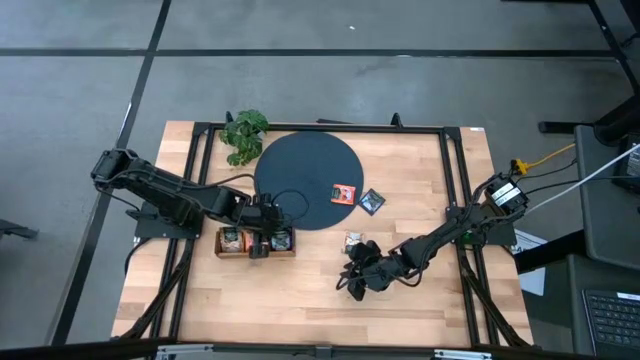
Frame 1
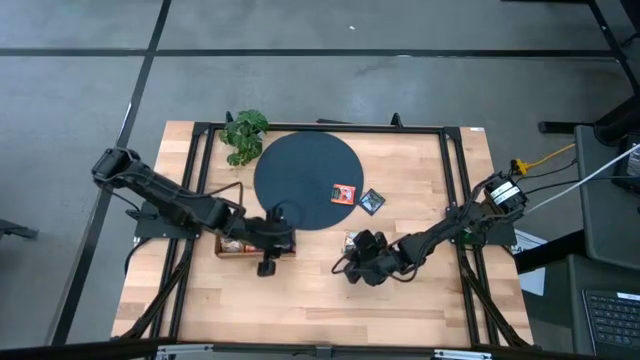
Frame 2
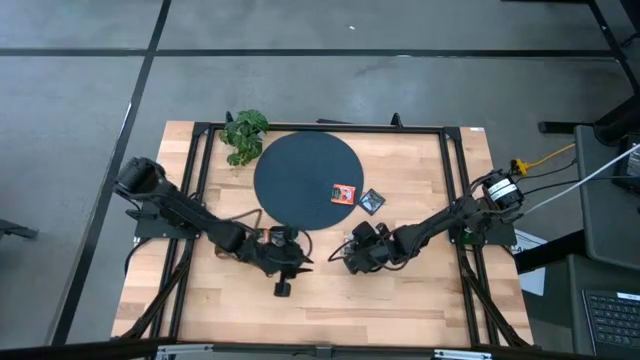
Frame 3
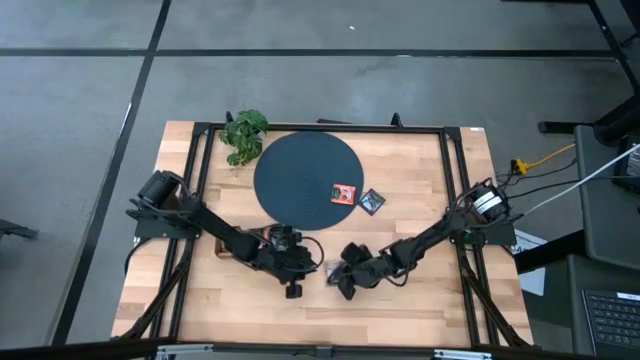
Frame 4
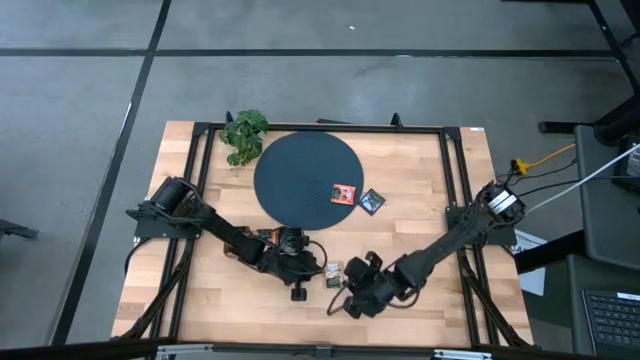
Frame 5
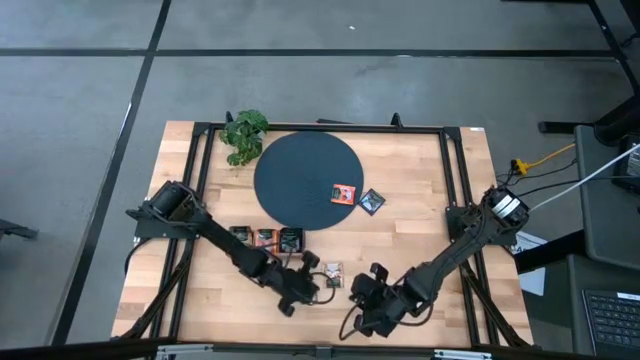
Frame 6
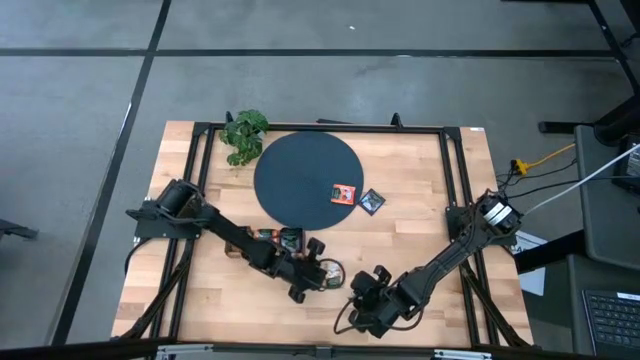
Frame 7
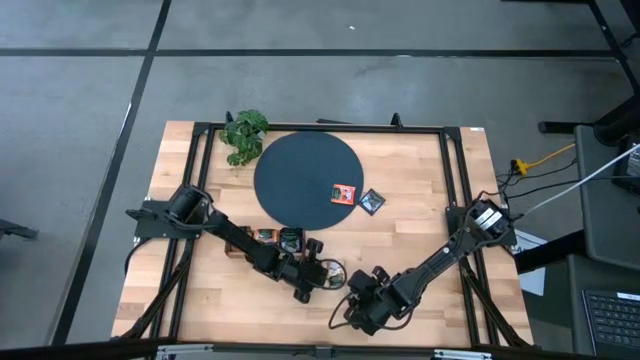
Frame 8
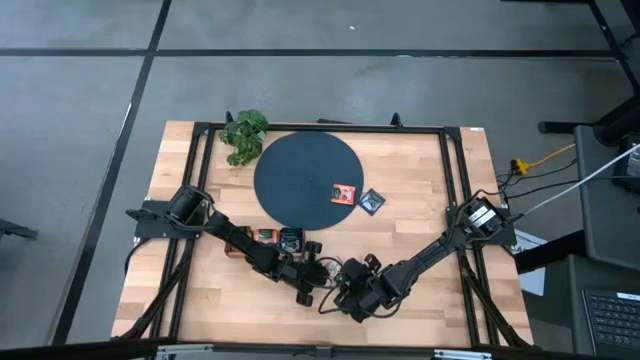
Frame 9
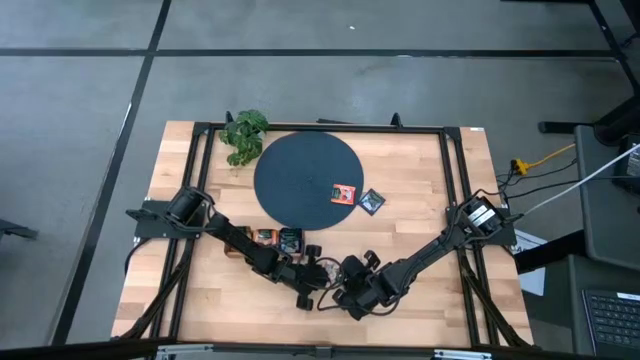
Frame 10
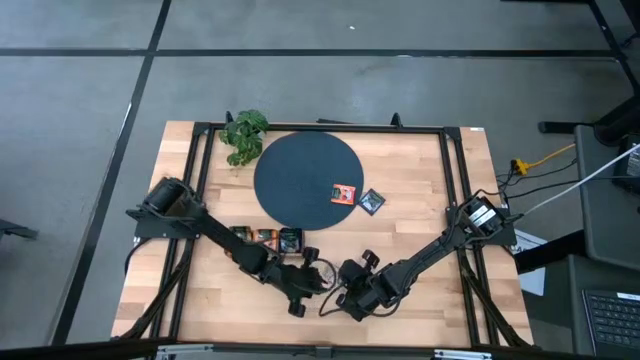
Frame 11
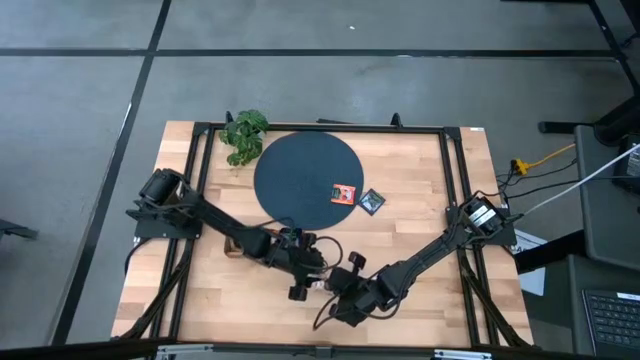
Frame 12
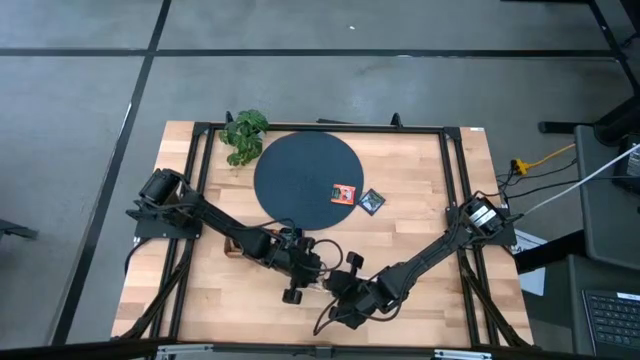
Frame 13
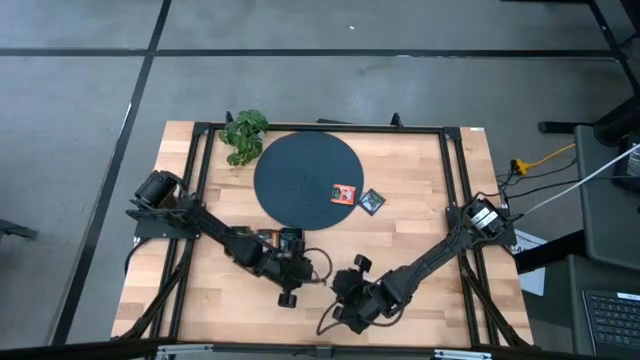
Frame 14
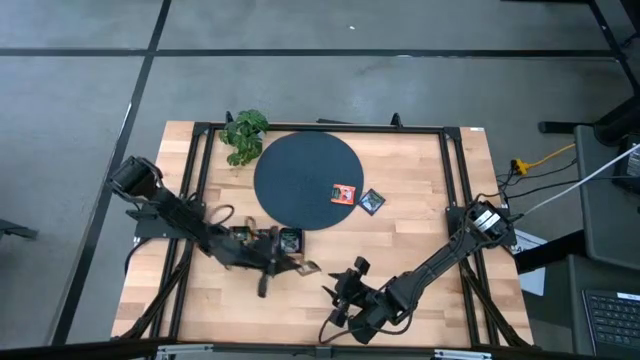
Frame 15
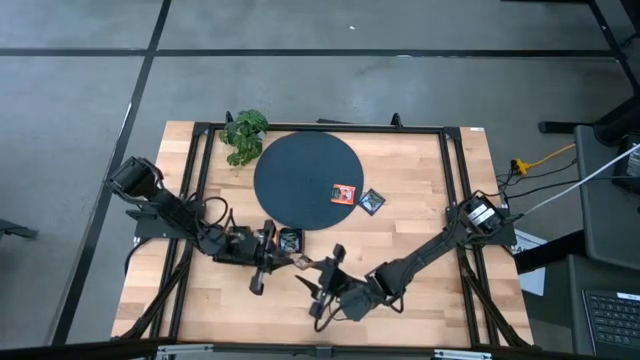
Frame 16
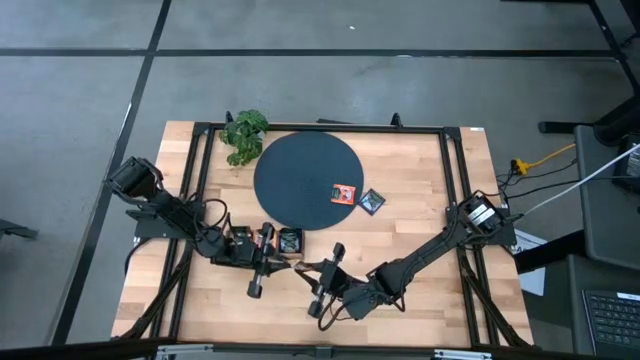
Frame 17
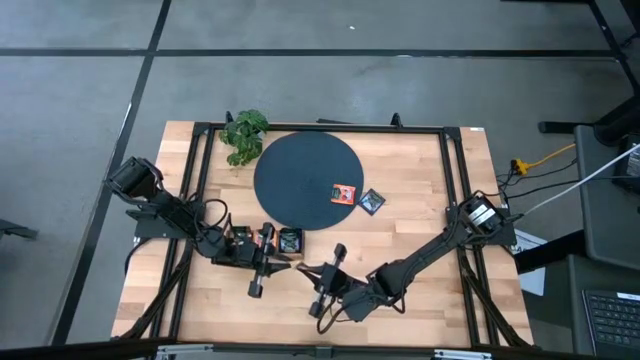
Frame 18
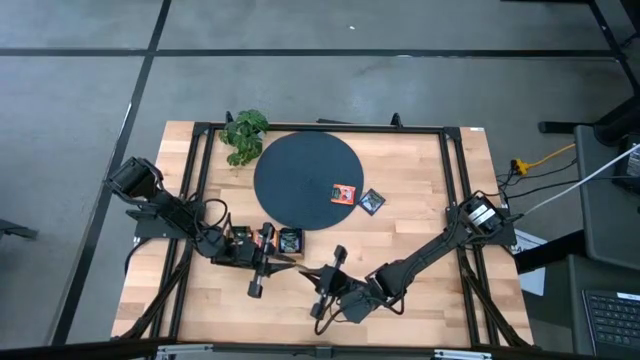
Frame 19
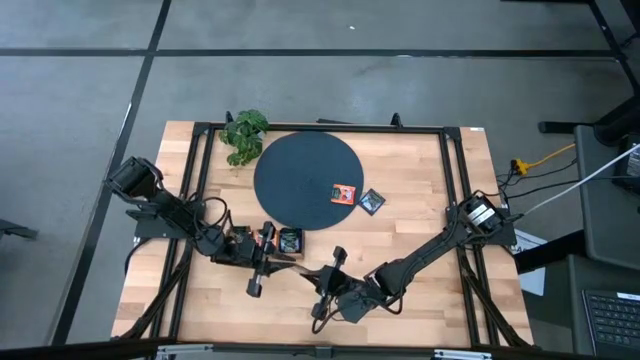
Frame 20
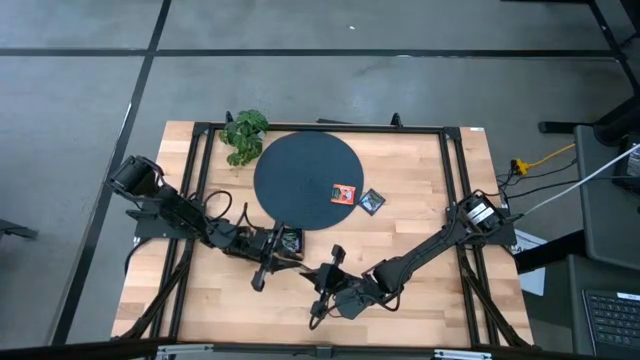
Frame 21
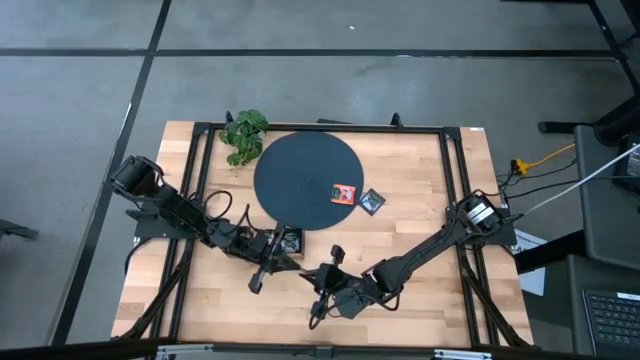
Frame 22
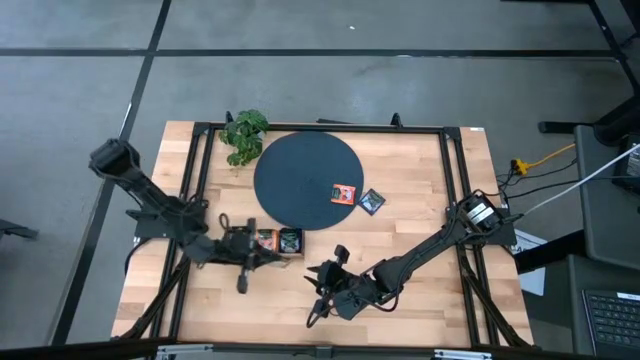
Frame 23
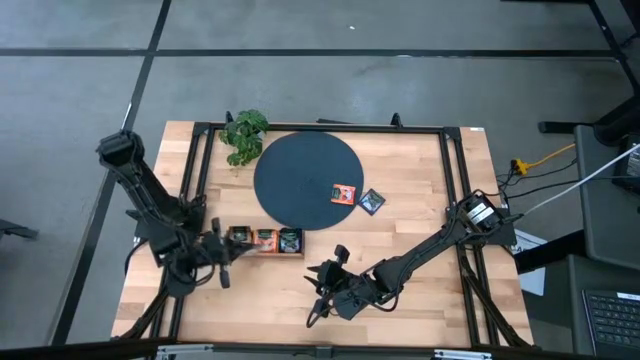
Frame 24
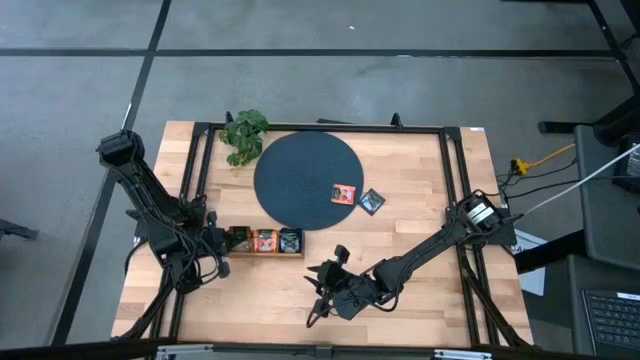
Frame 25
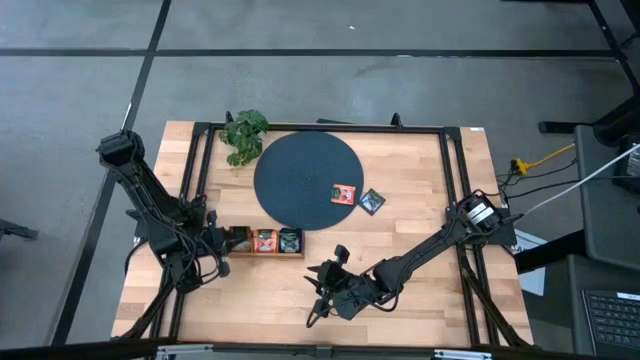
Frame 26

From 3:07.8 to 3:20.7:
Task: Pick & Place Tea
Put the brown tea bag into the left section of the wooden organizer

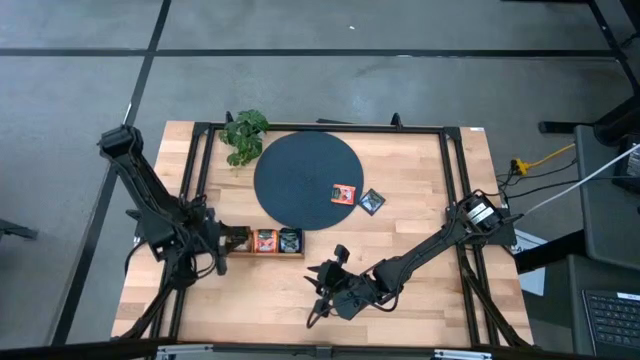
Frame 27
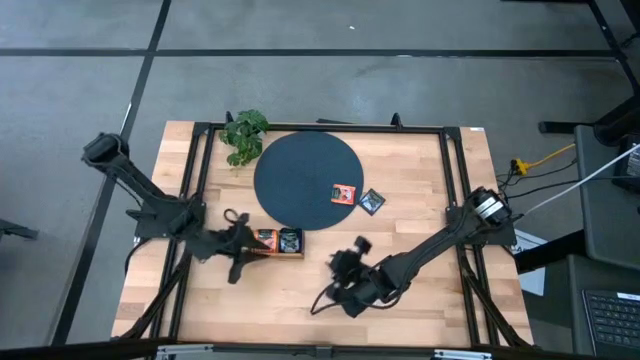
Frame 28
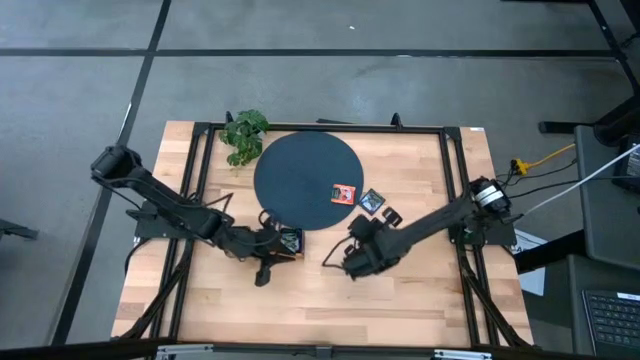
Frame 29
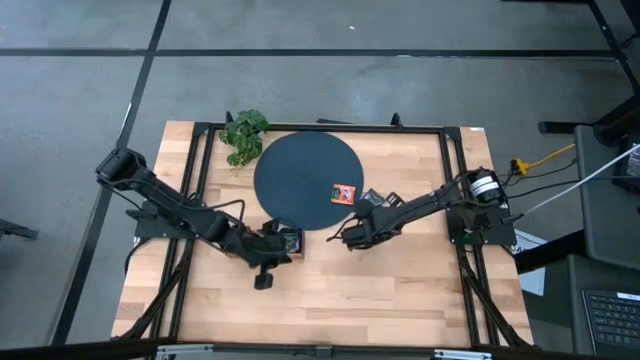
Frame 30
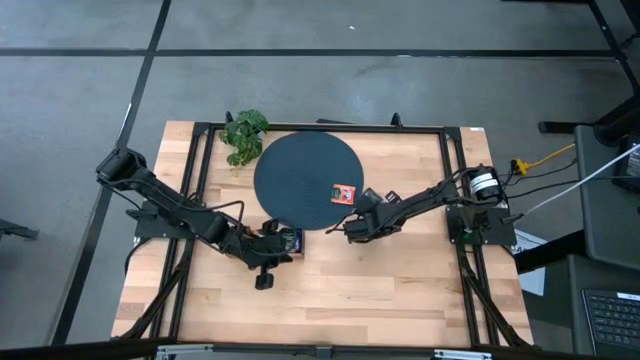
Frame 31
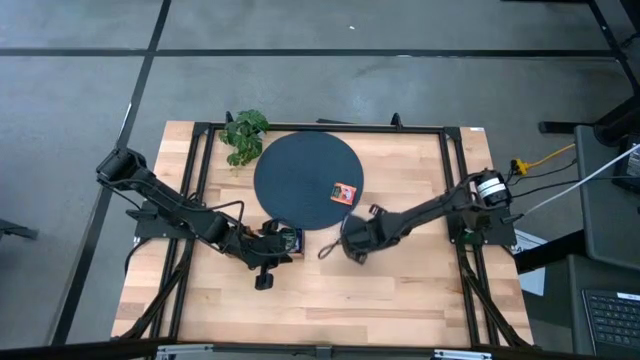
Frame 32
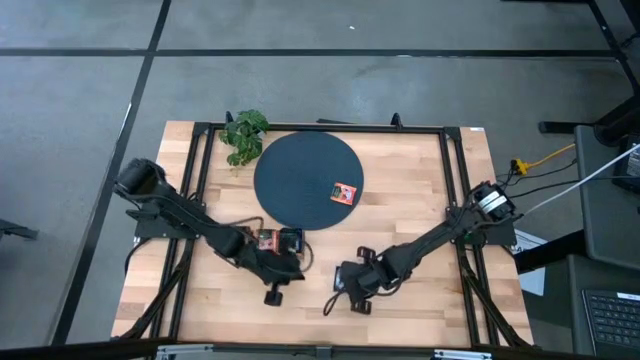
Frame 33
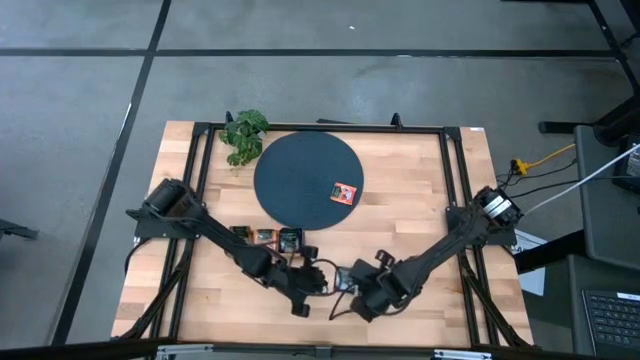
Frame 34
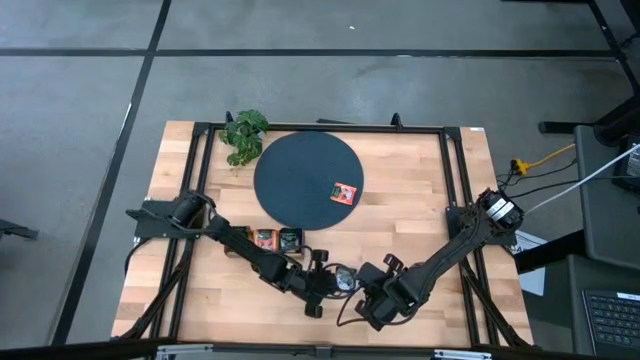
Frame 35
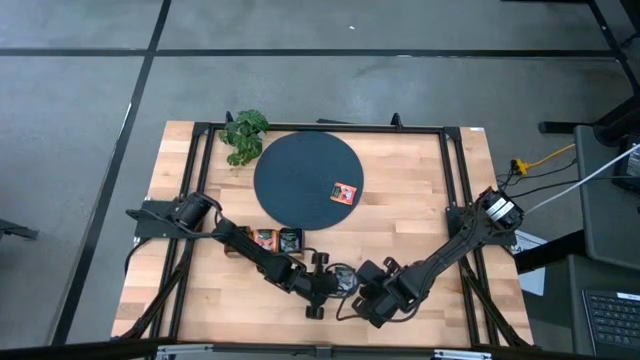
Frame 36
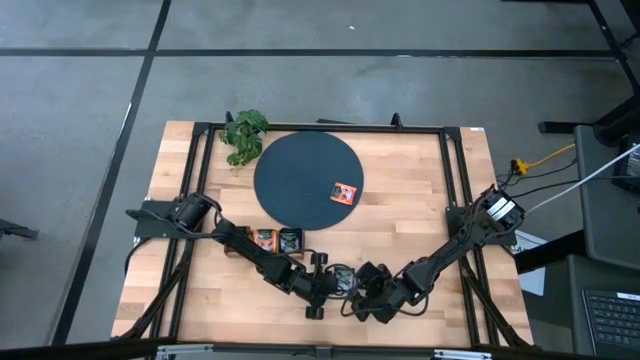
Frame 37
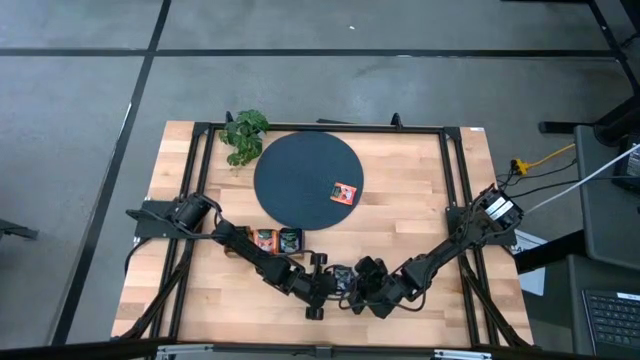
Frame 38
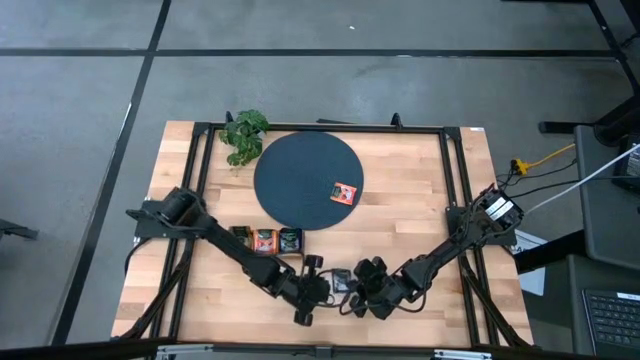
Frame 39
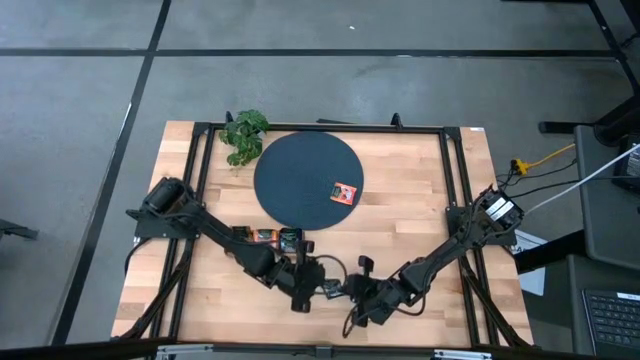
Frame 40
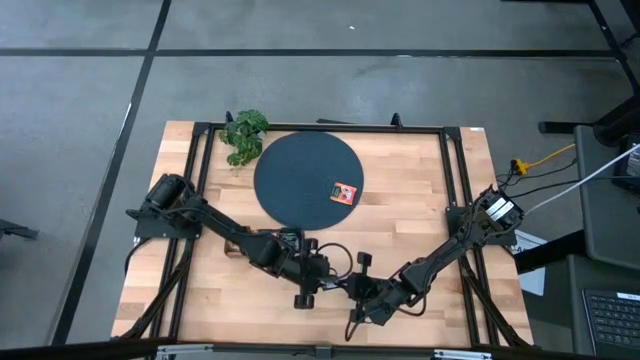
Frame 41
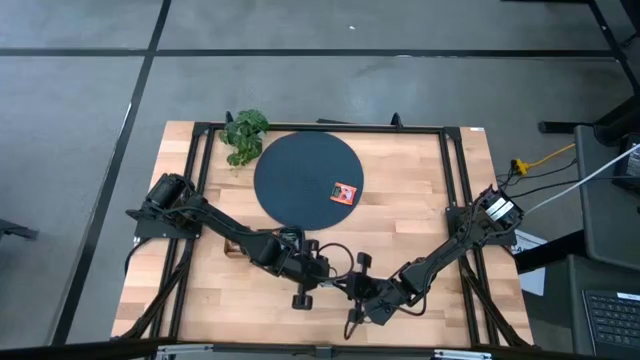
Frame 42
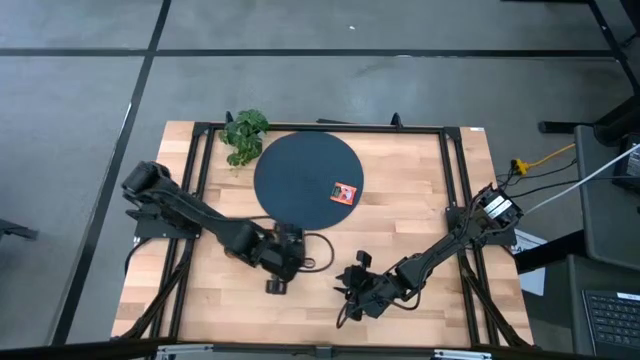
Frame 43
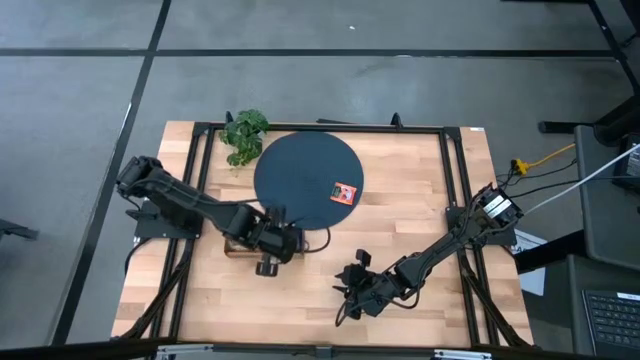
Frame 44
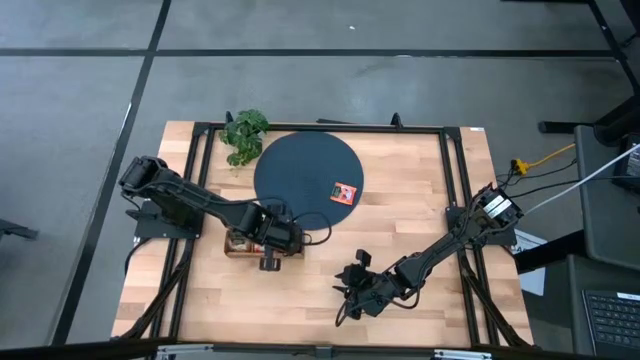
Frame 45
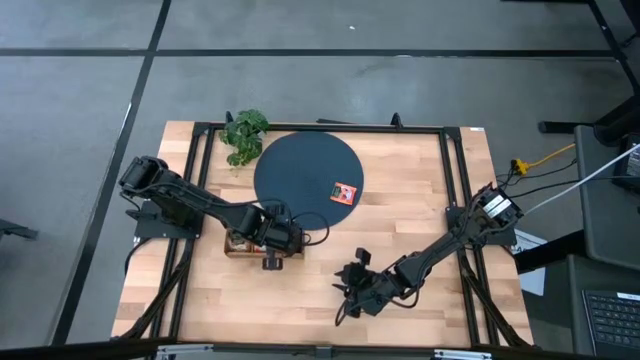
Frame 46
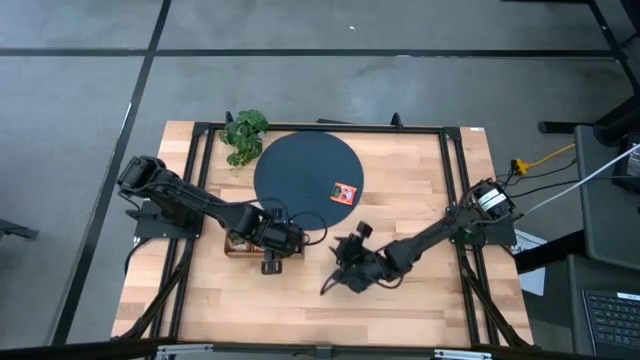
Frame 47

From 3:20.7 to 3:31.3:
Put the purple tea bag into the right section of the wooden organizer
